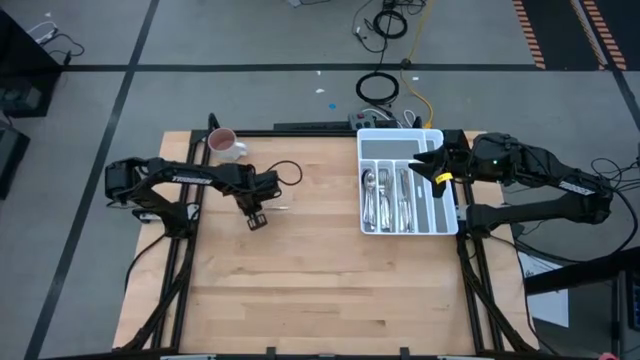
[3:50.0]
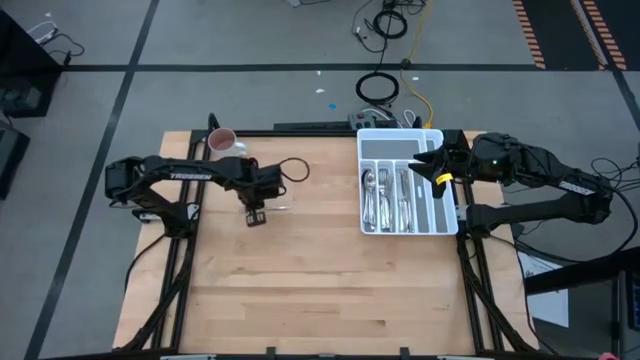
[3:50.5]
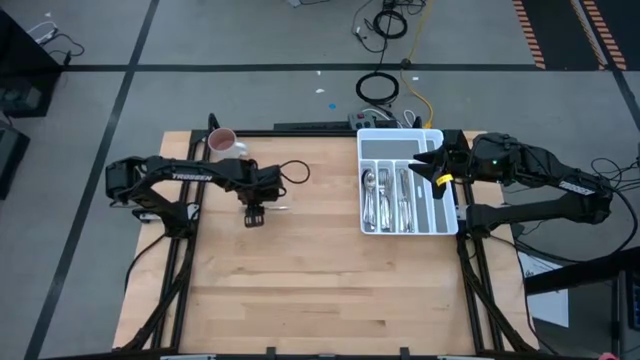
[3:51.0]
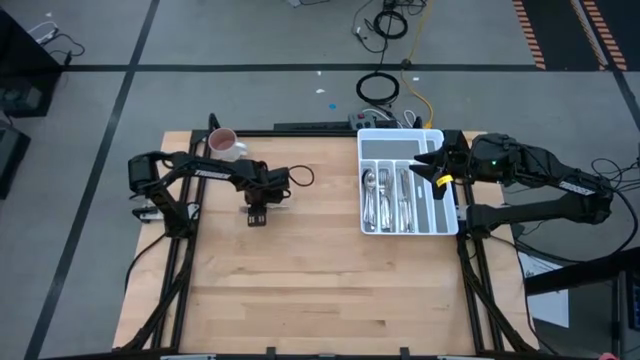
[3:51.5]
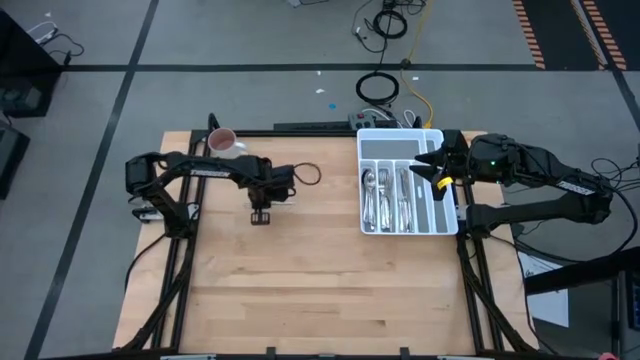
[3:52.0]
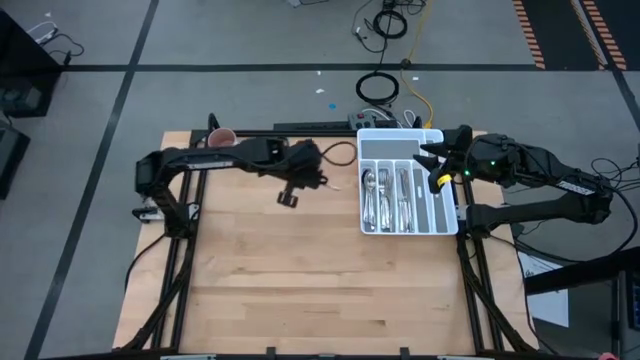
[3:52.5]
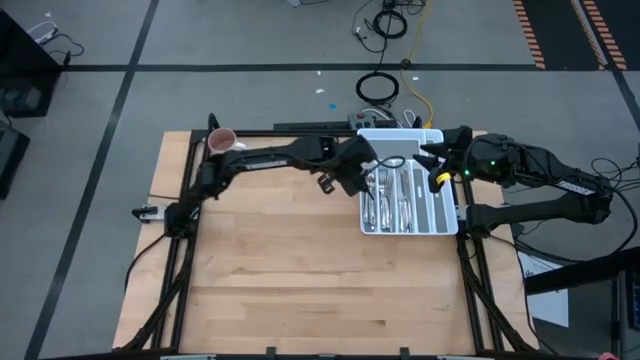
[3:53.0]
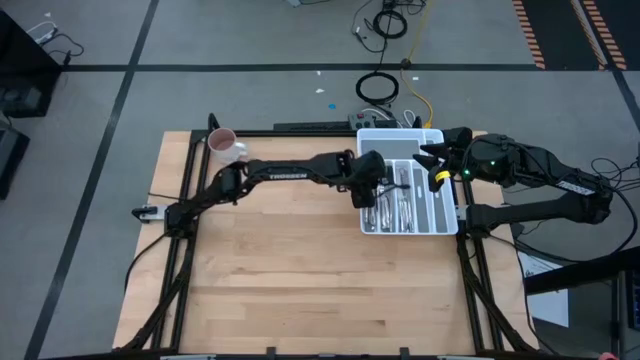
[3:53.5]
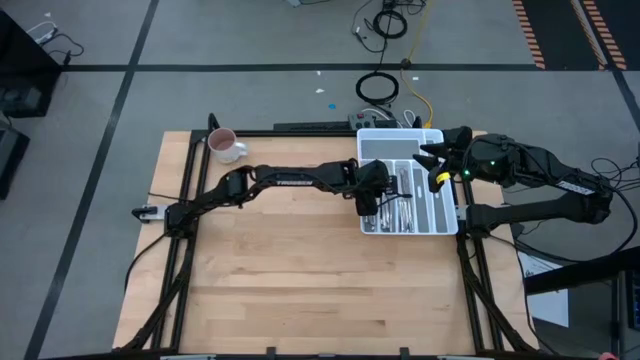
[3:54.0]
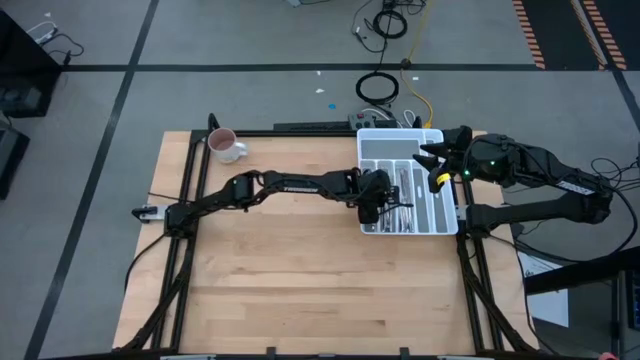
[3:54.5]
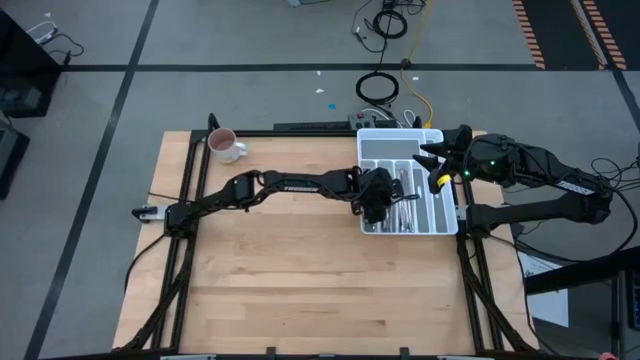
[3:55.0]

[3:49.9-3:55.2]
Task: Sort silverware
Put the silver fork into the silverware tray

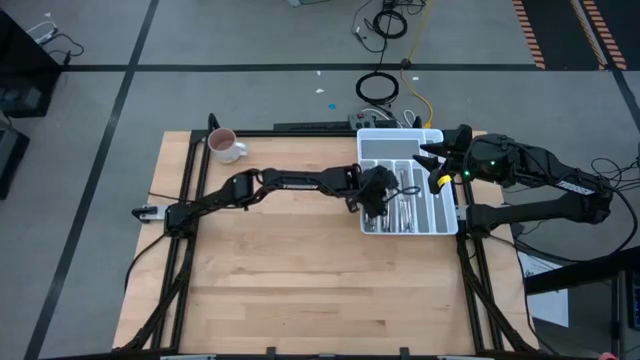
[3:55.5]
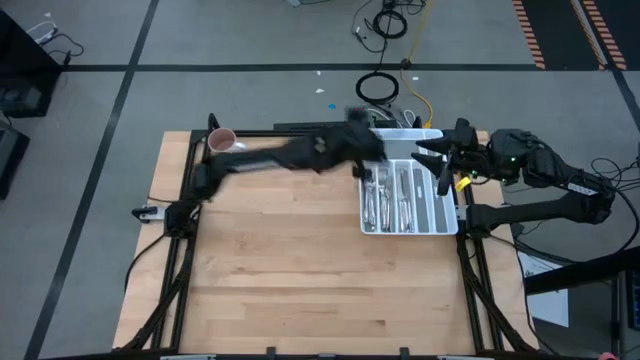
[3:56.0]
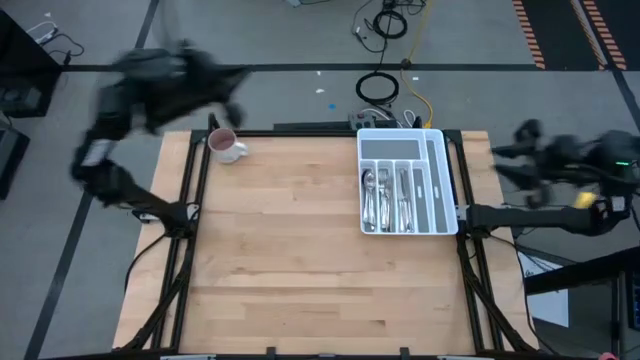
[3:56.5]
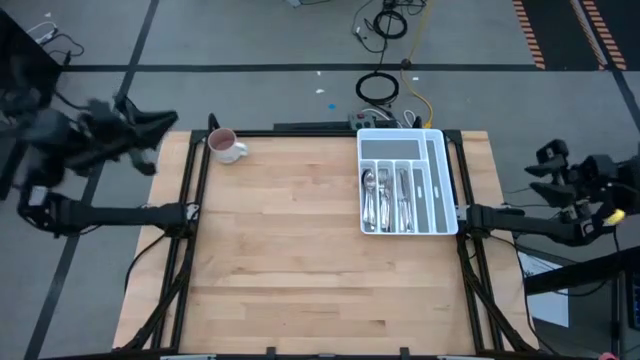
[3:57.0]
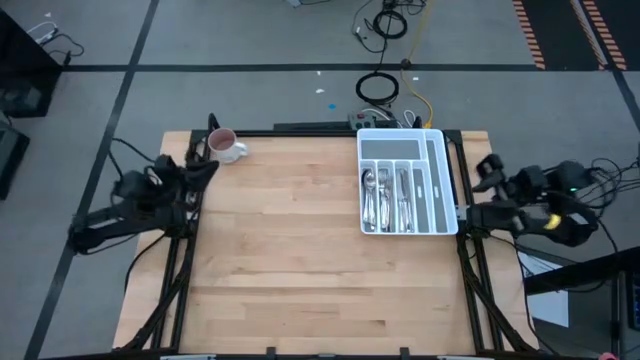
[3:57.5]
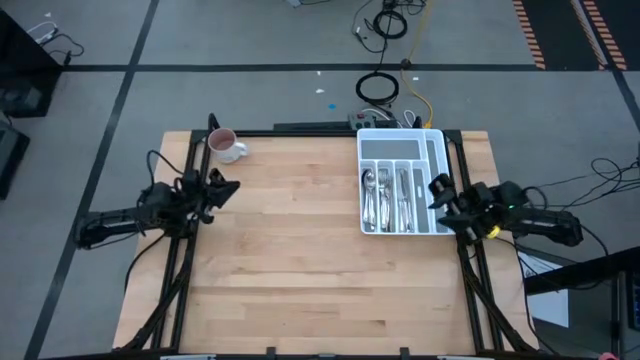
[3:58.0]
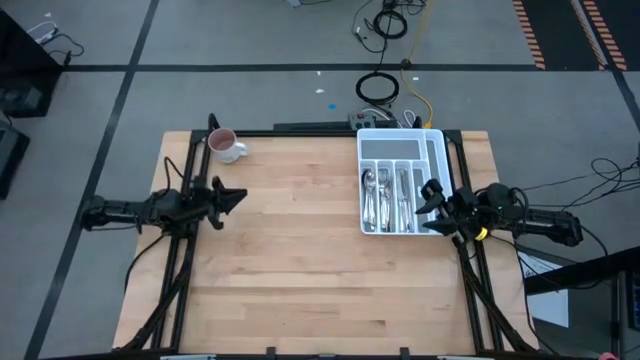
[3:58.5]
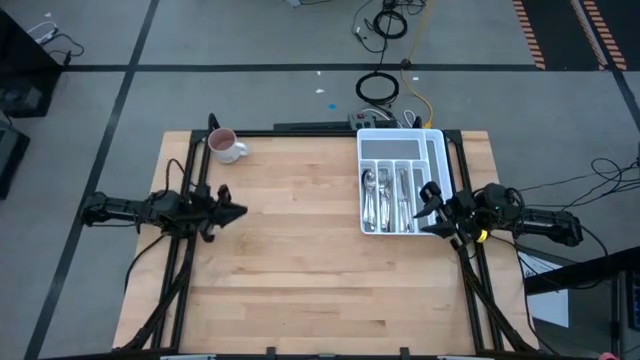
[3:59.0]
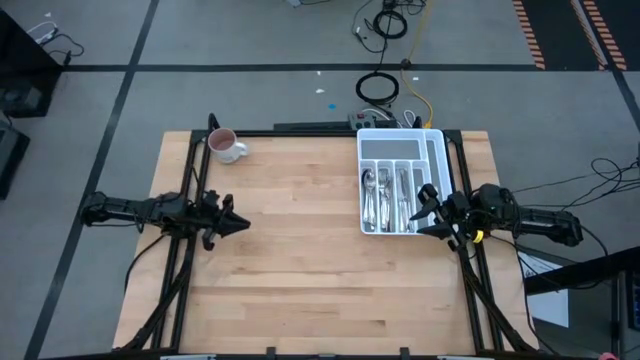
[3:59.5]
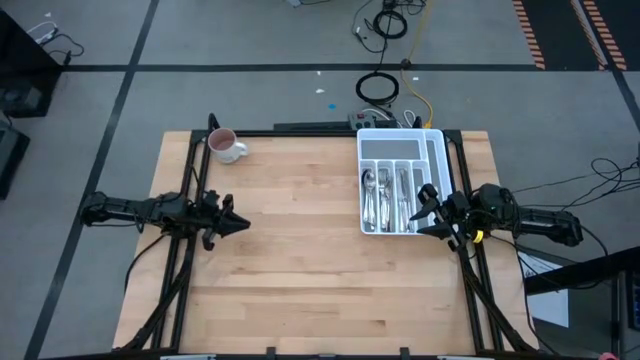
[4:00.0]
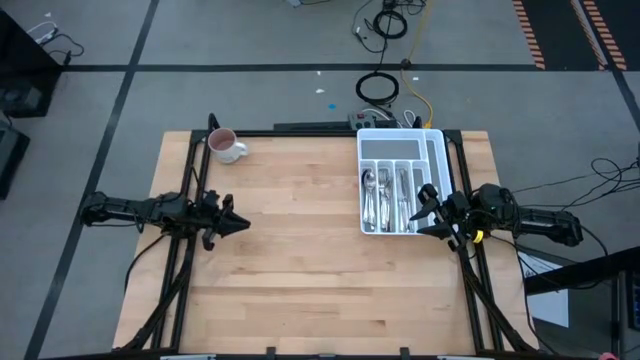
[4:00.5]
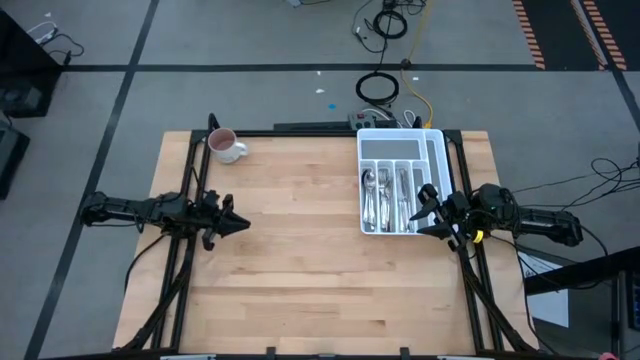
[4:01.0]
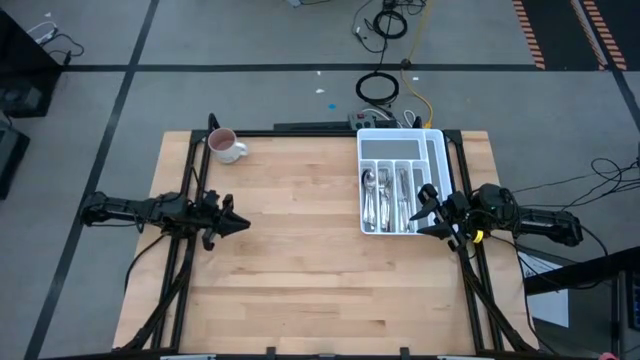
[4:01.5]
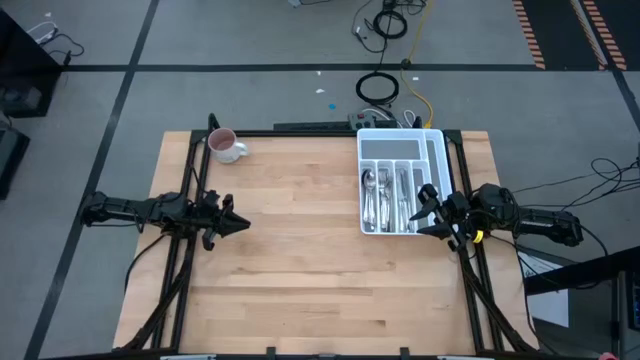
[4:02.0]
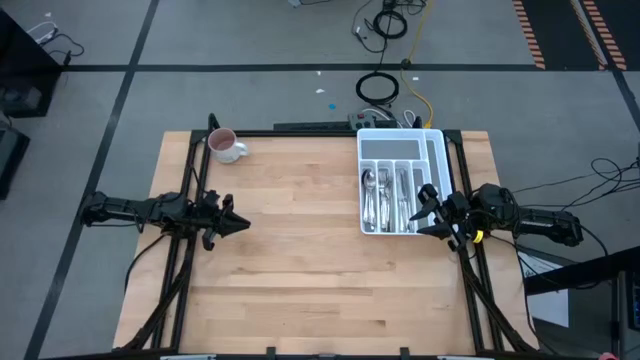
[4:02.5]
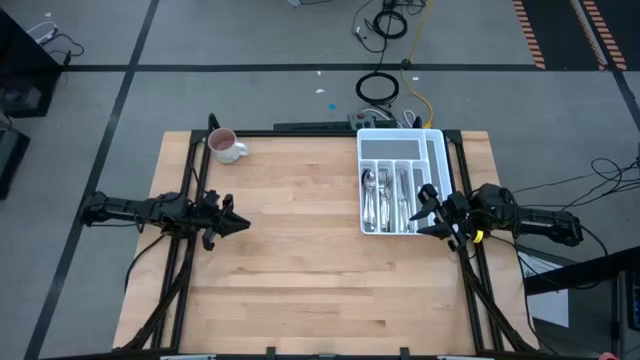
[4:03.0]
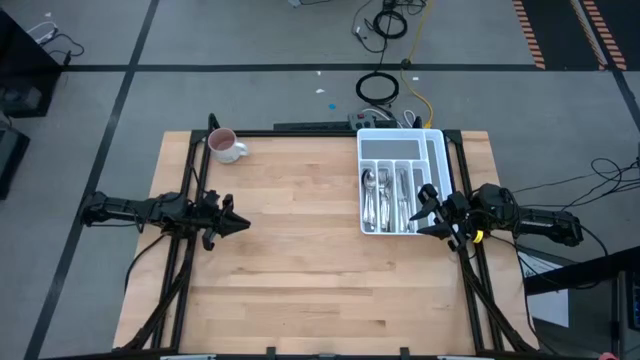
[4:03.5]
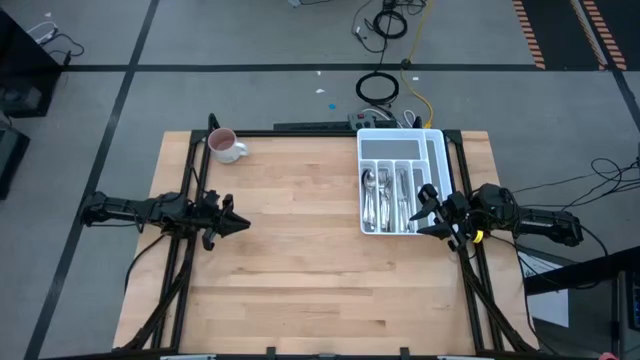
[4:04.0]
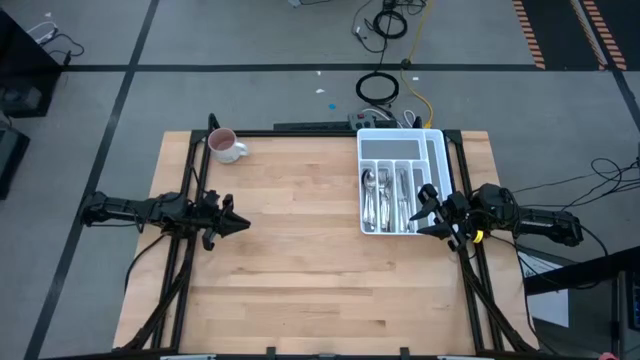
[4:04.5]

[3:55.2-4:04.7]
Return to Home Position

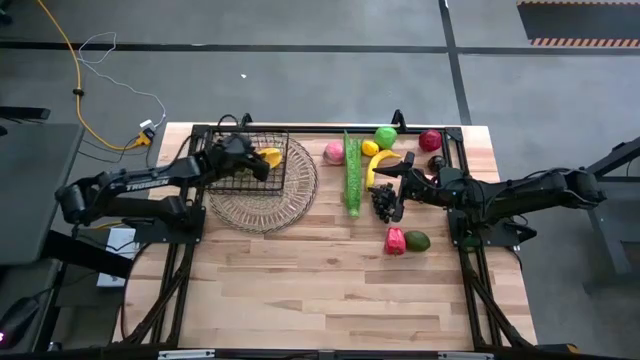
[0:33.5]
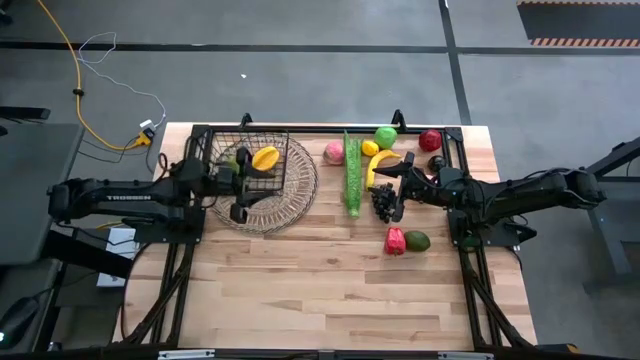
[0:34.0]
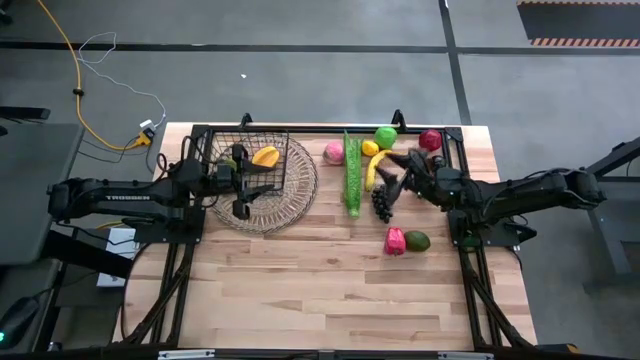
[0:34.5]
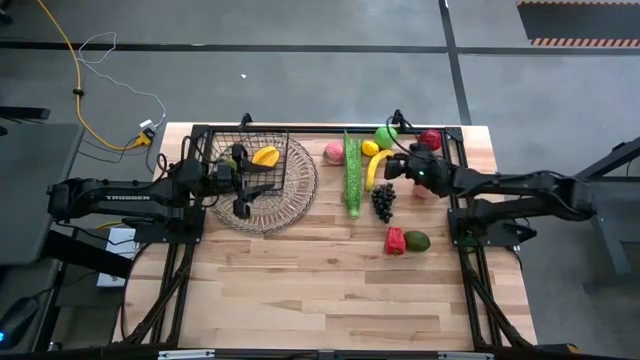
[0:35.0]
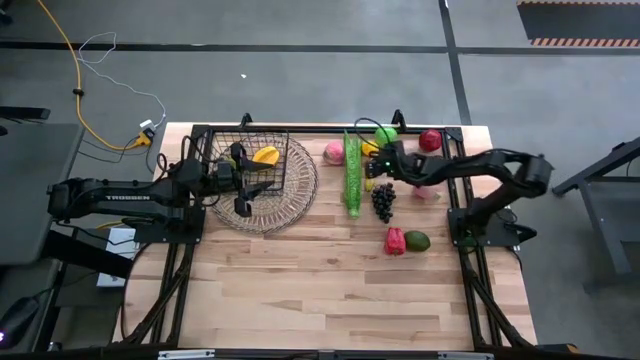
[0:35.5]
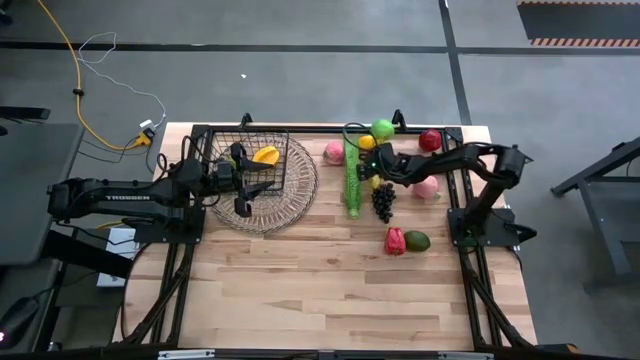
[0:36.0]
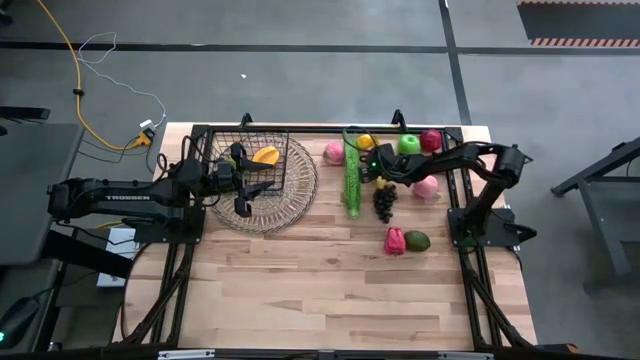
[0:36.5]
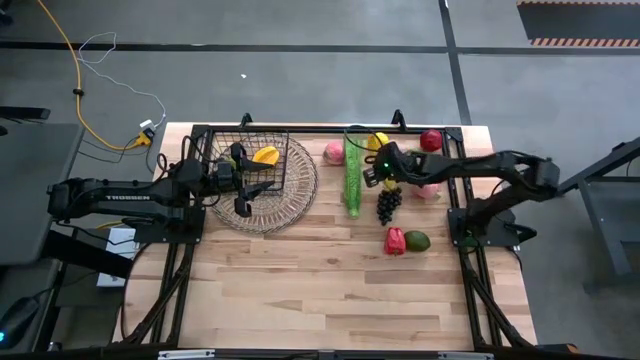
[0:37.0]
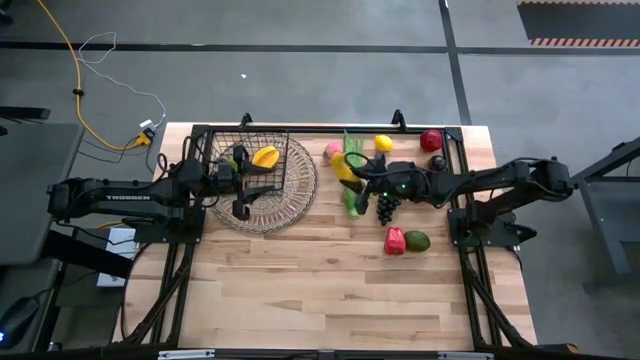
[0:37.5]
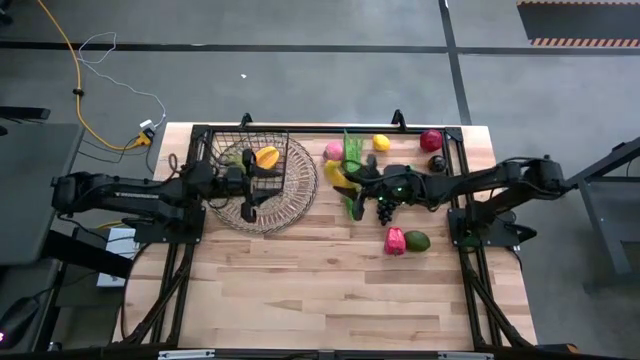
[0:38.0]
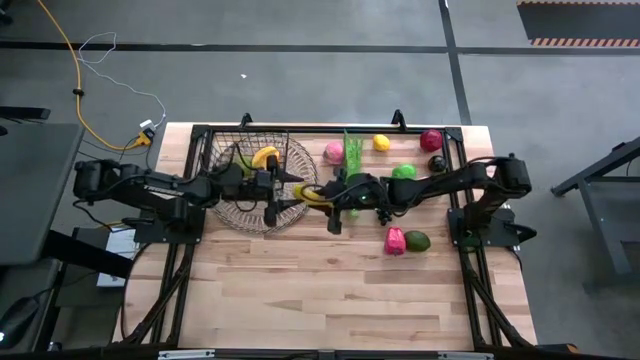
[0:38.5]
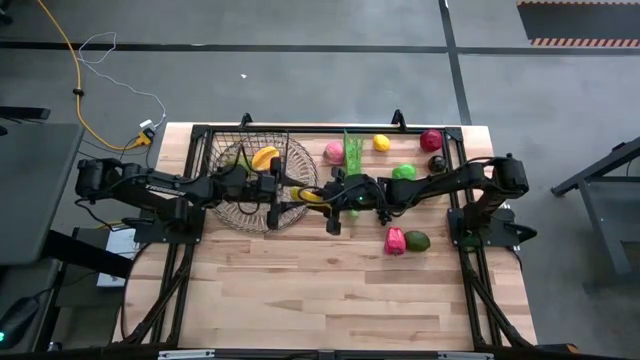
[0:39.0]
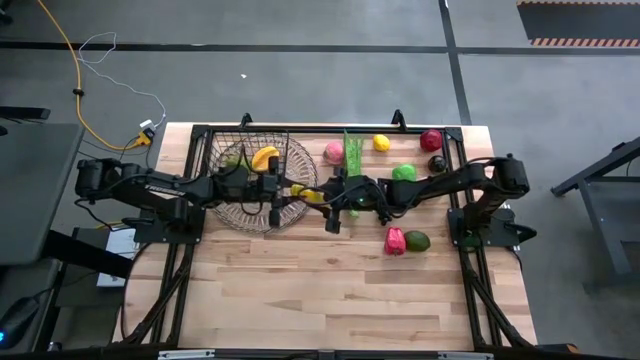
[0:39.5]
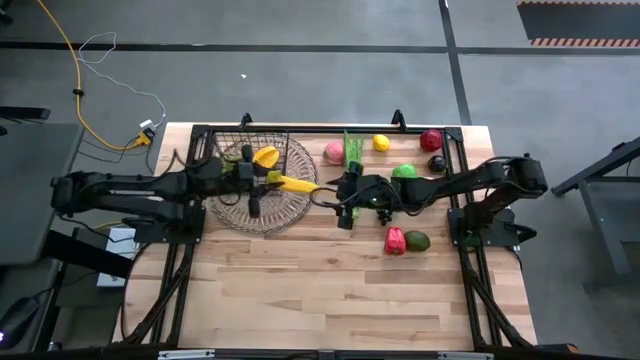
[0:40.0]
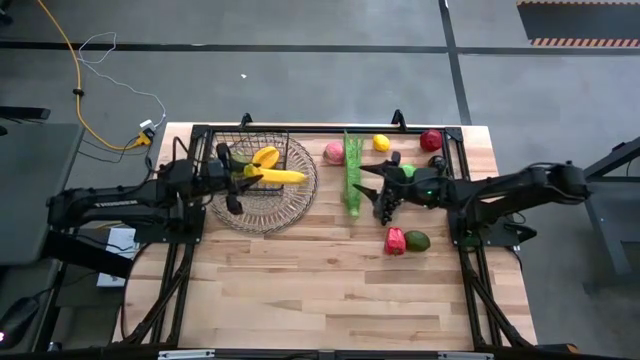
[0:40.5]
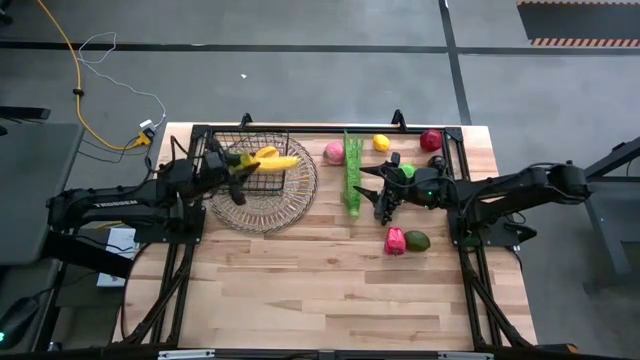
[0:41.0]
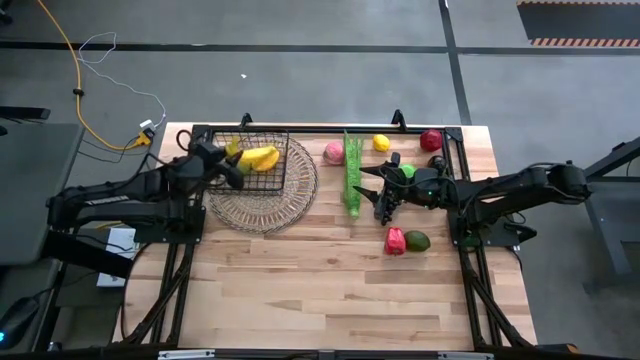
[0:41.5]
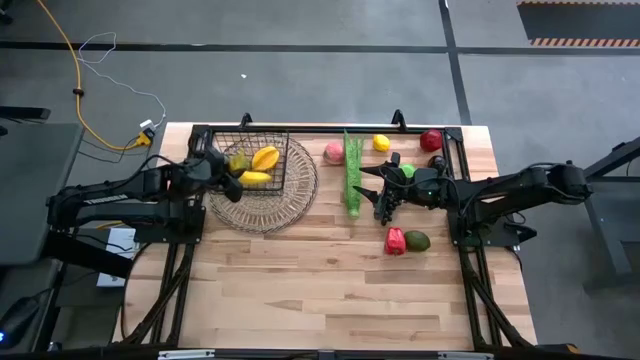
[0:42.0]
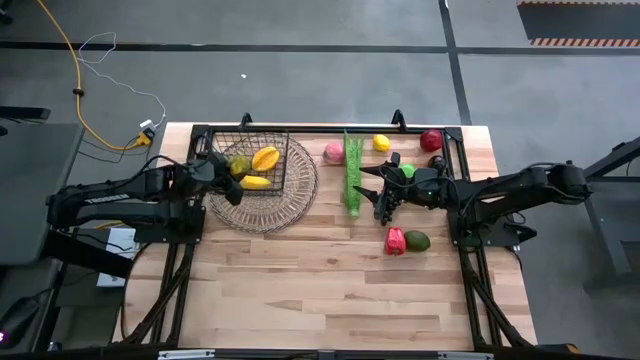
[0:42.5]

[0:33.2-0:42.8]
Task: Build produce basket
Put the yellow banana into the black wire basket
